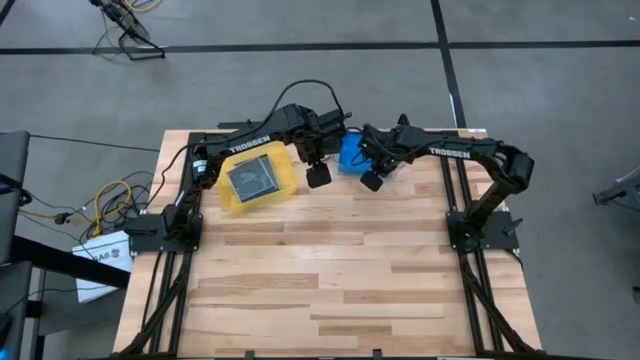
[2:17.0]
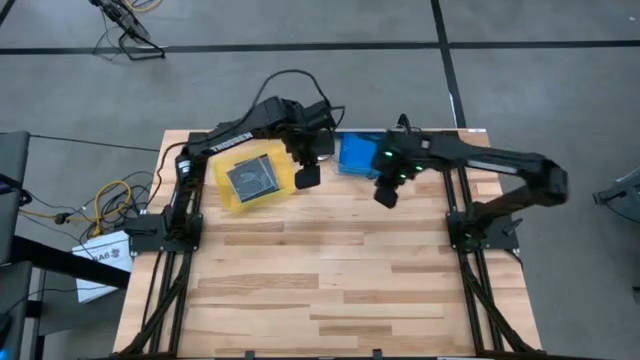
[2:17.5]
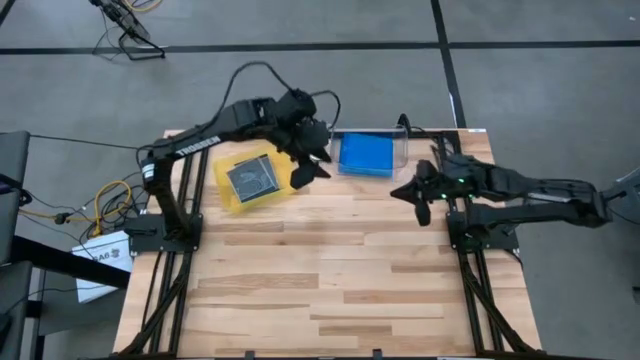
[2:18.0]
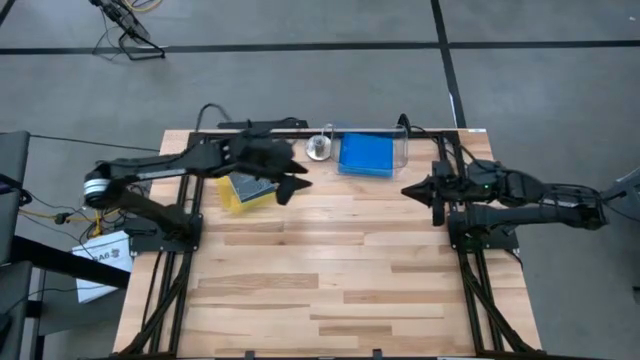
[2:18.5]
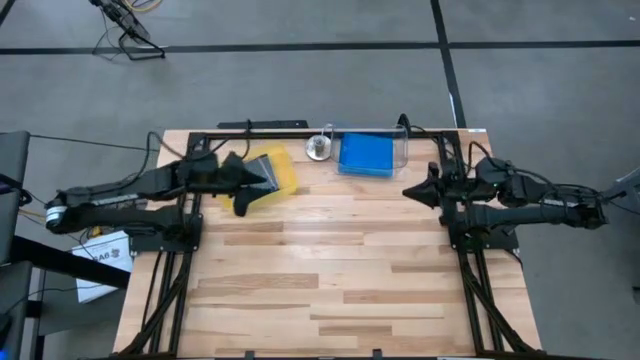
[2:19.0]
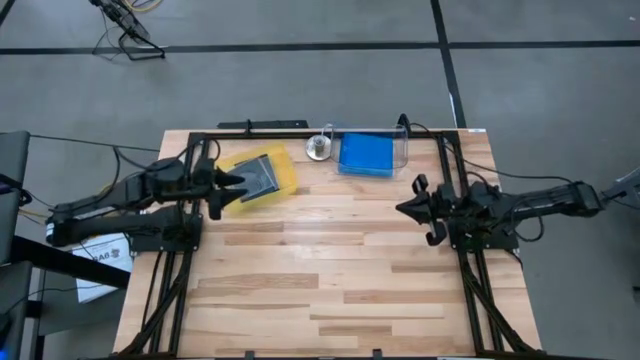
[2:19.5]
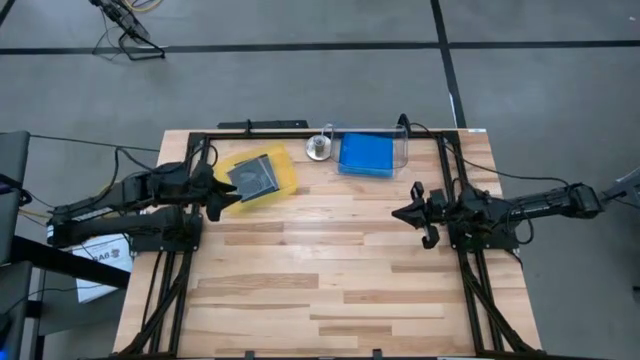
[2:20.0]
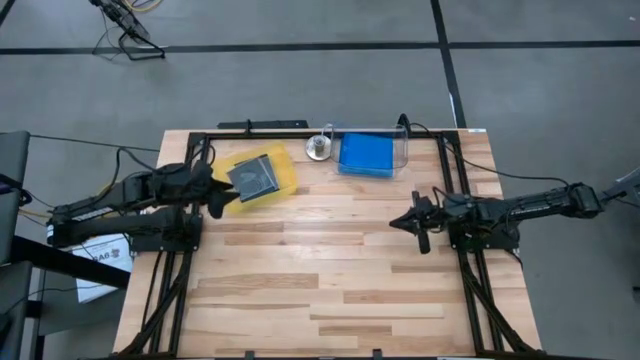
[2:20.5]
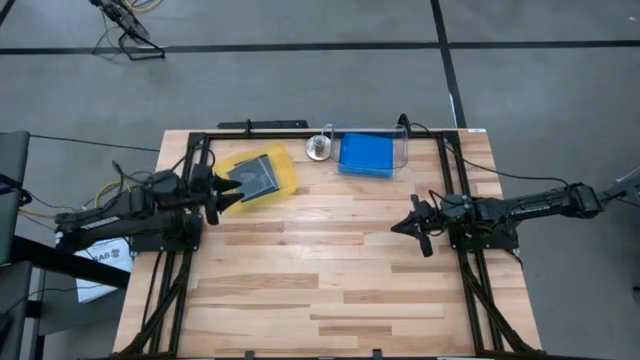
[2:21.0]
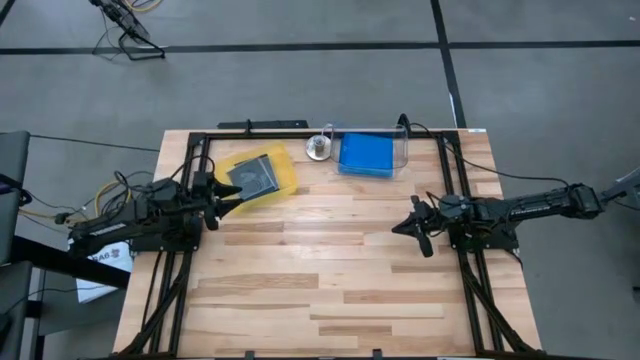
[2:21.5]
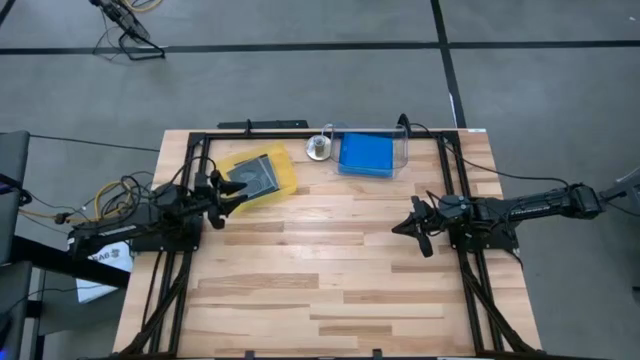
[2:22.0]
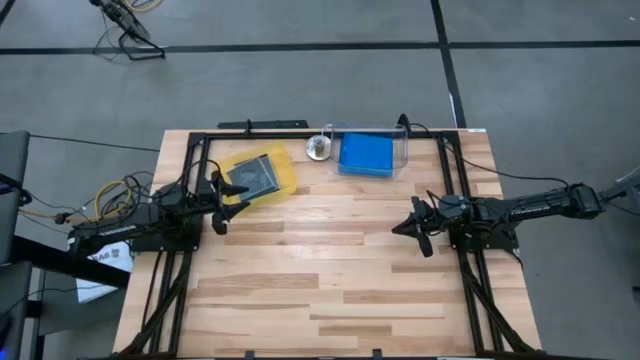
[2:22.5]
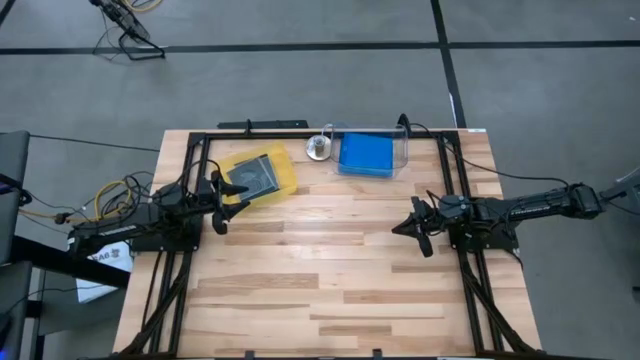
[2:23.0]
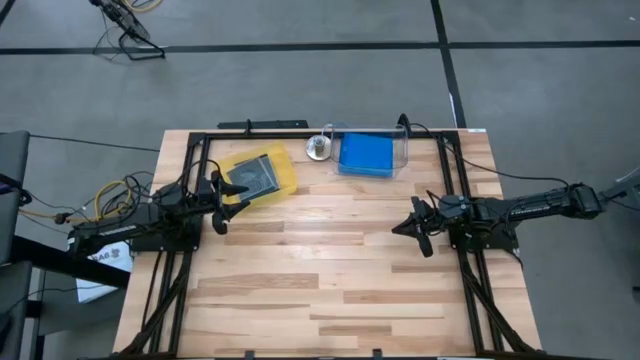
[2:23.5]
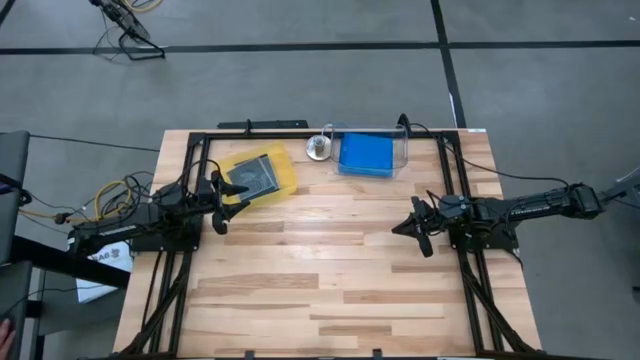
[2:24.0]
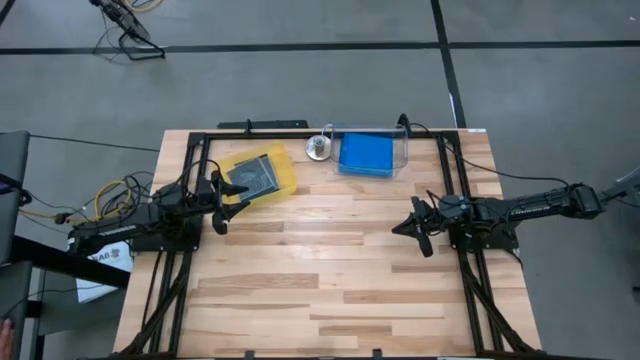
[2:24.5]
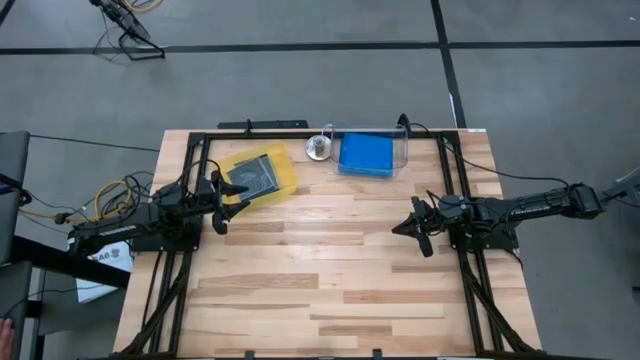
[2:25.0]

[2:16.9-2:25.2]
Task: Pick & place jewel cases by type
Return to Home Position

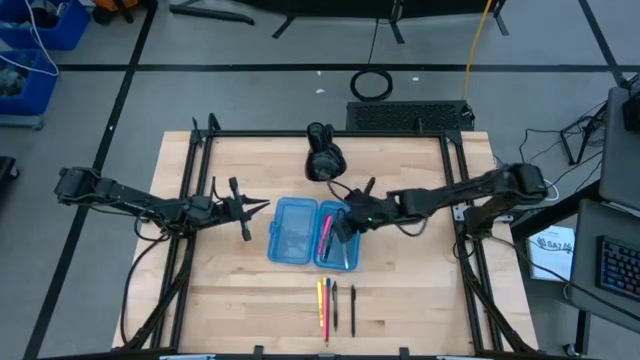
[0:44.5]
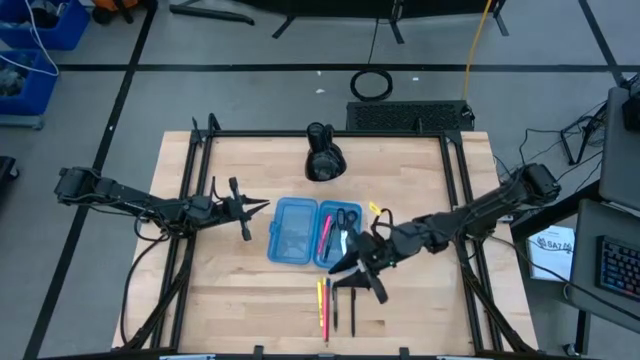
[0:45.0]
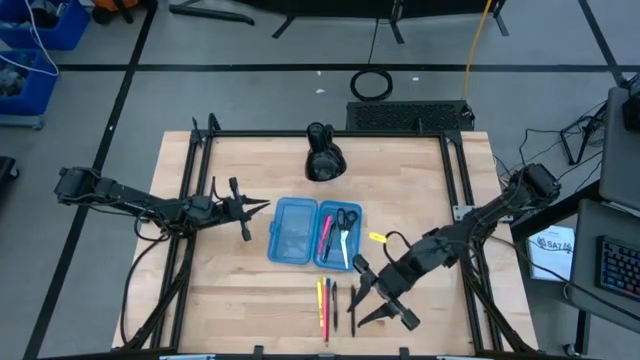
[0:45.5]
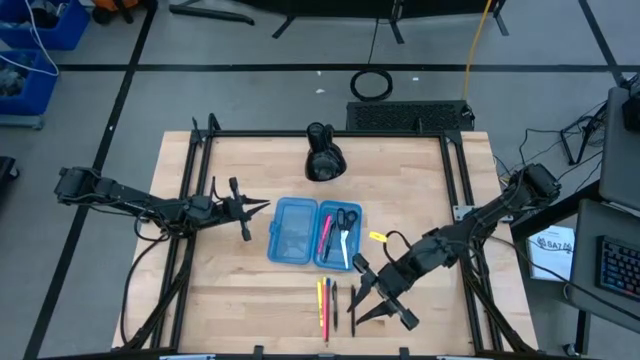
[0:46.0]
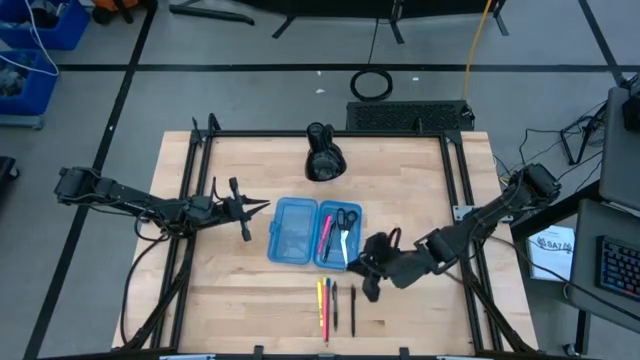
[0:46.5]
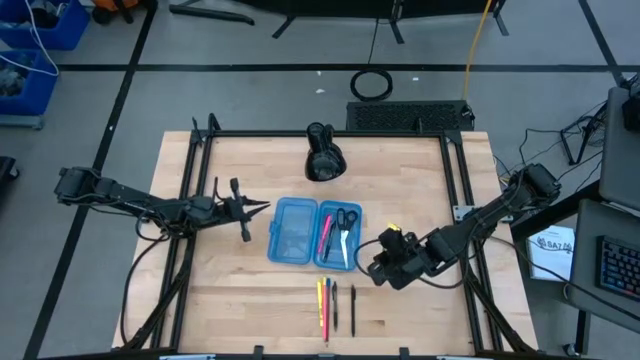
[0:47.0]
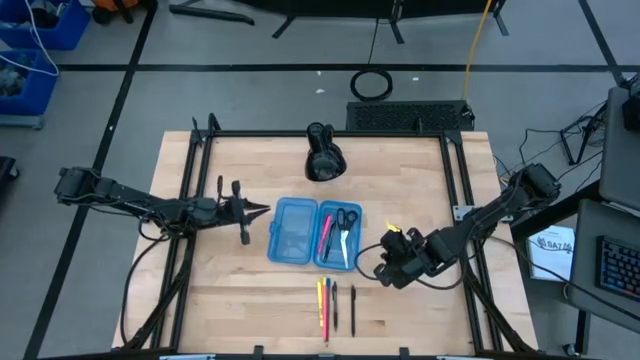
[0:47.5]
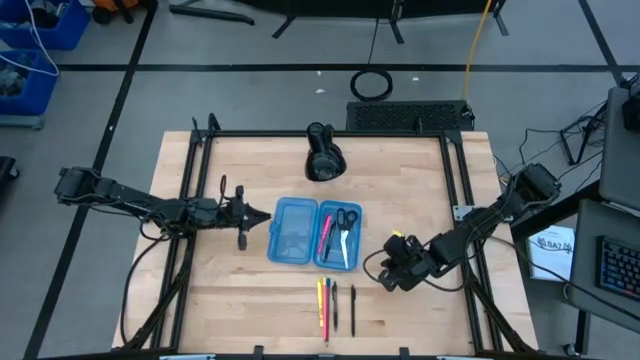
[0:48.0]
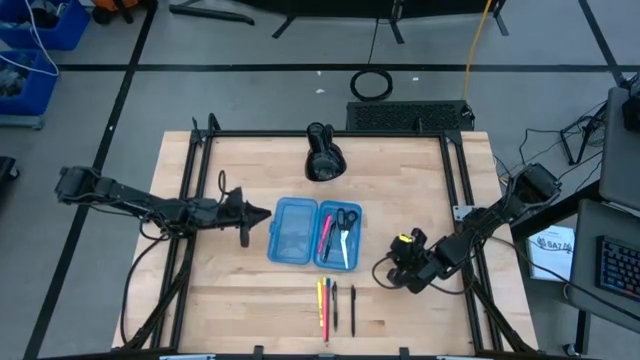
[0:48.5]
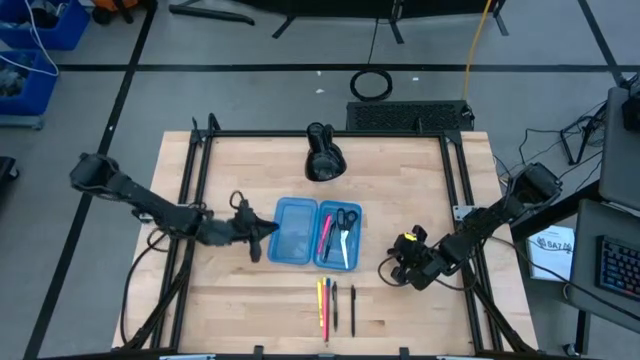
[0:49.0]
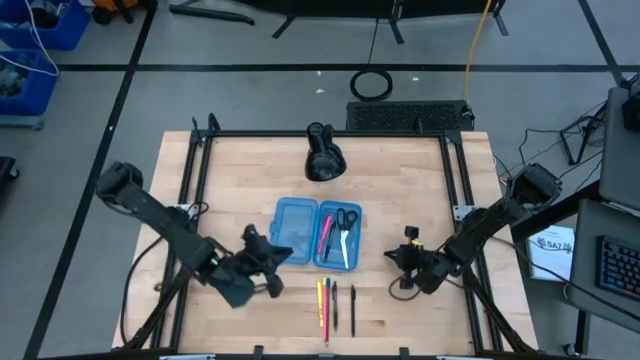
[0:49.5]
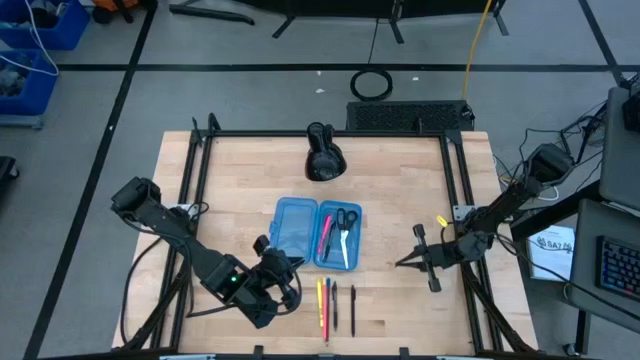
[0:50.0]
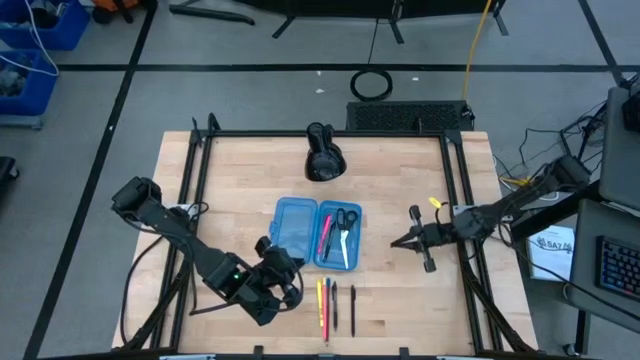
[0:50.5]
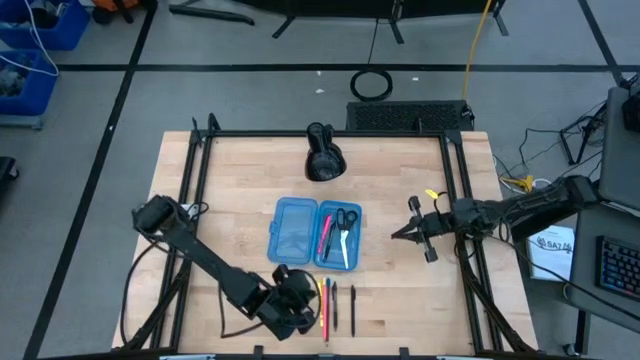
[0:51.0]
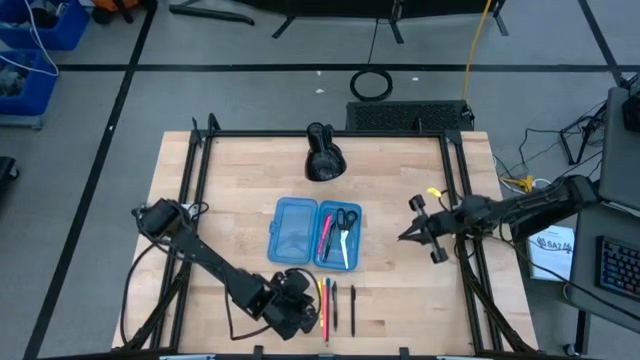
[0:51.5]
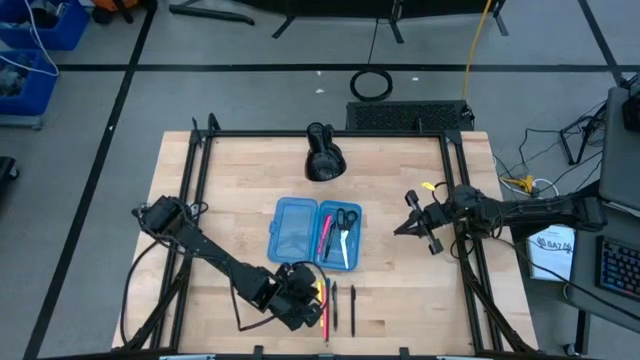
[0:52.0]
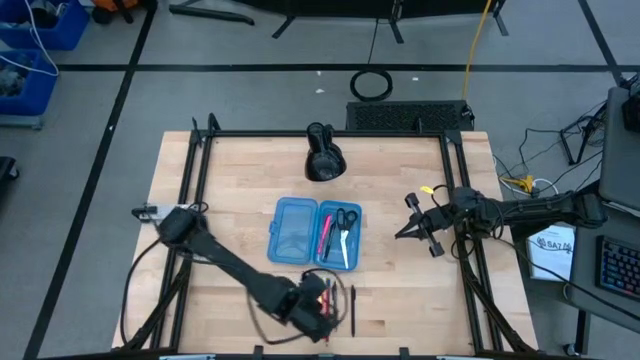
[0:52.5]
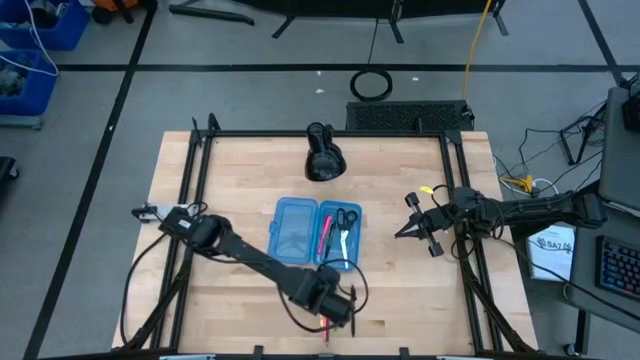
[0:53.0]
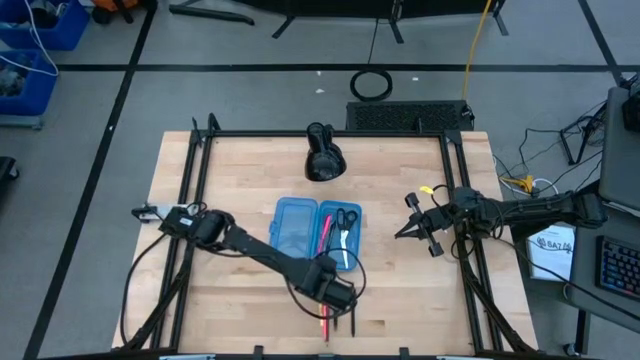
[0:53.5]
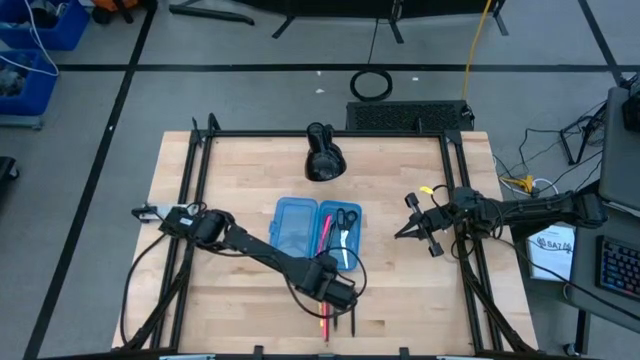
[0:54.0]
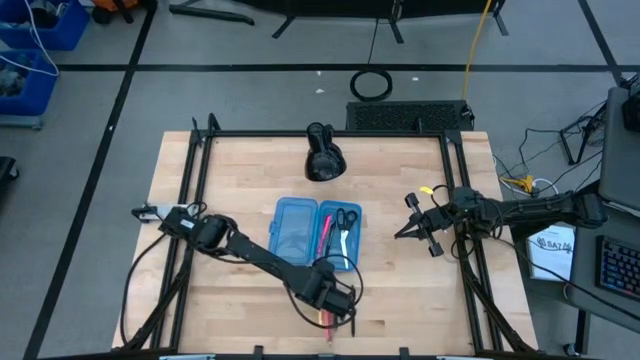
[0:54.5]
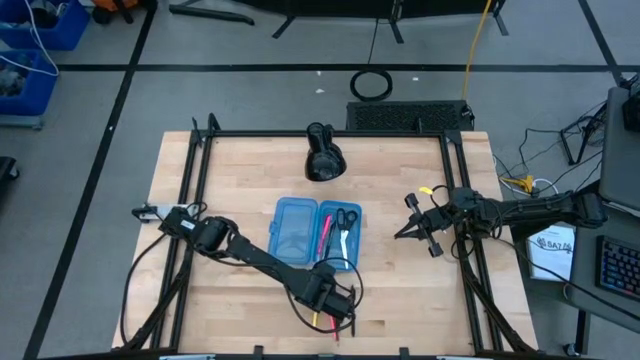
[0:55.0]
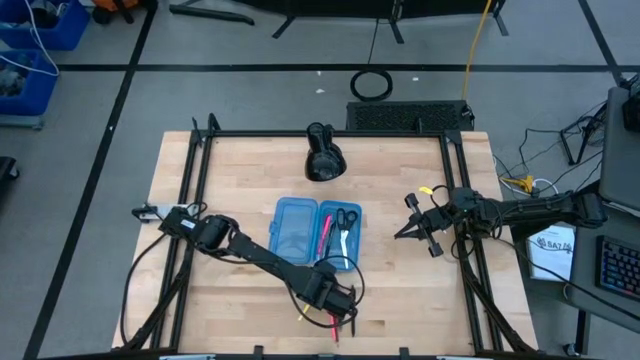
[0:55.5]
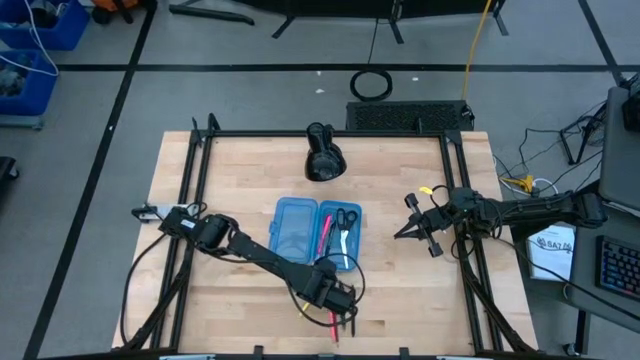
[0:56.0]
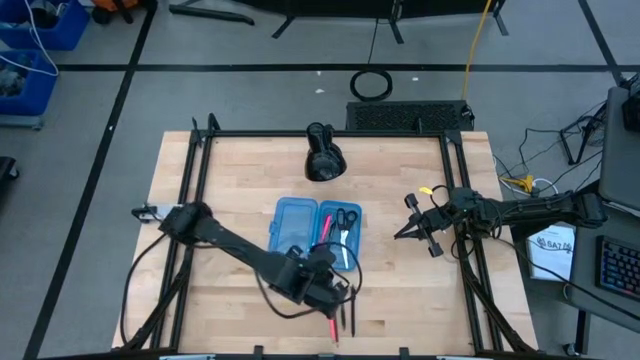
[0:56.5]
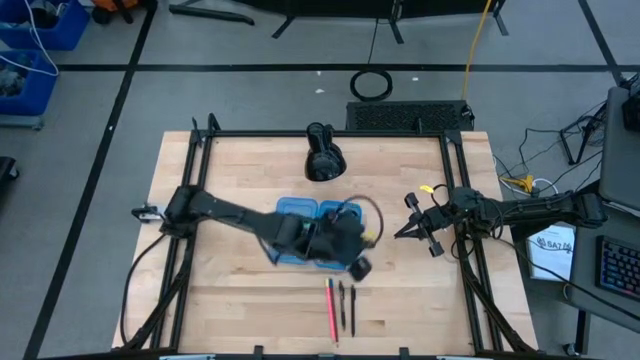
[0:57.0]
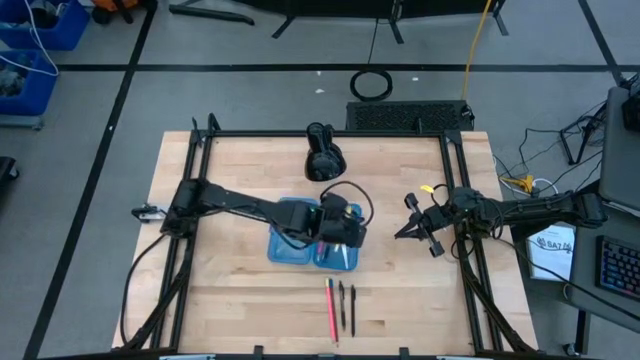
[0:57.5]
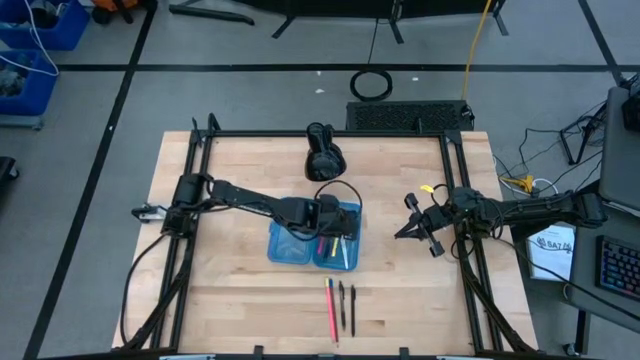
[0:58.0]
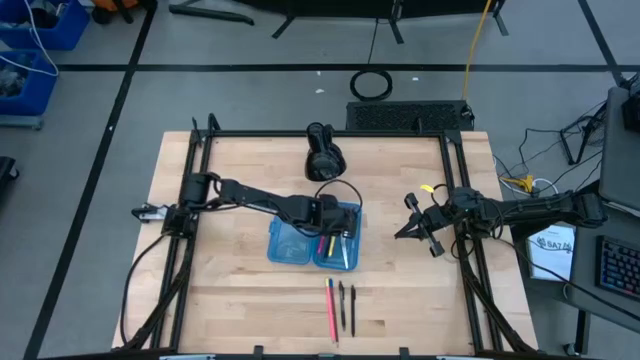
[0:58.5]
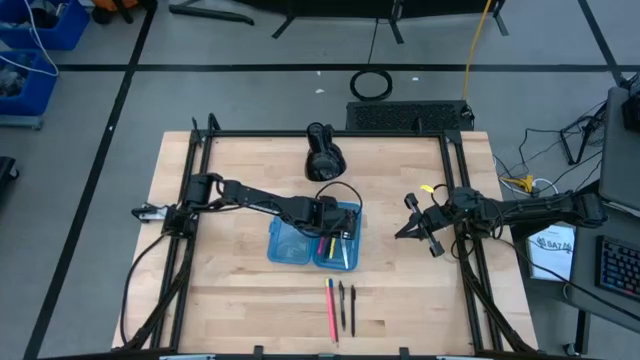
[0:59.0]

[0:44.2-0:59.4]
Task: Pick & place school supplies into a supply box
Put the yellow pen into the blue supply box
